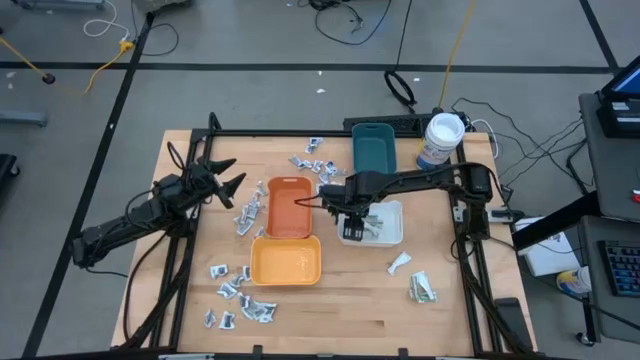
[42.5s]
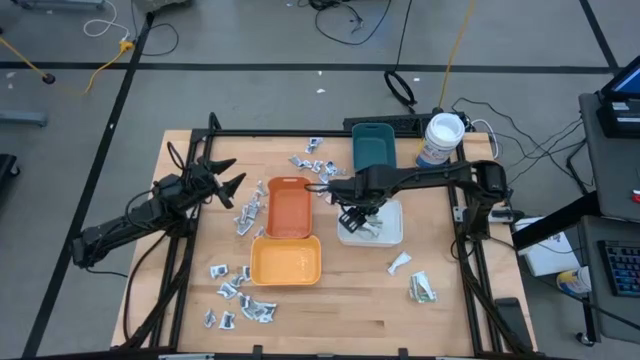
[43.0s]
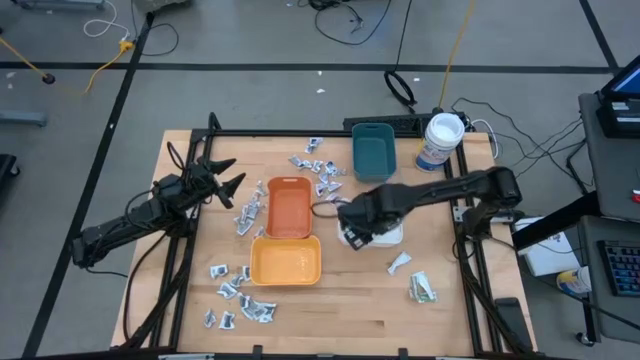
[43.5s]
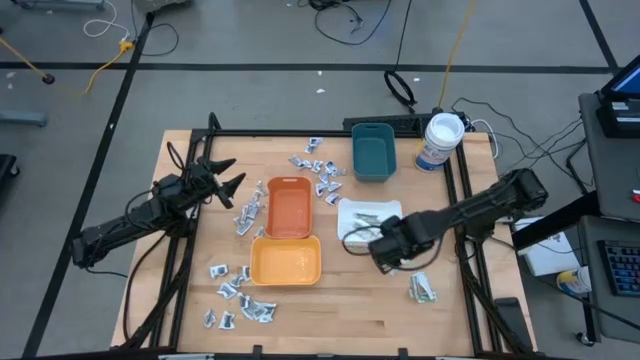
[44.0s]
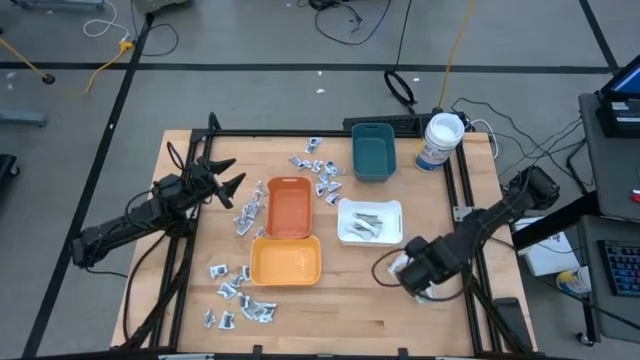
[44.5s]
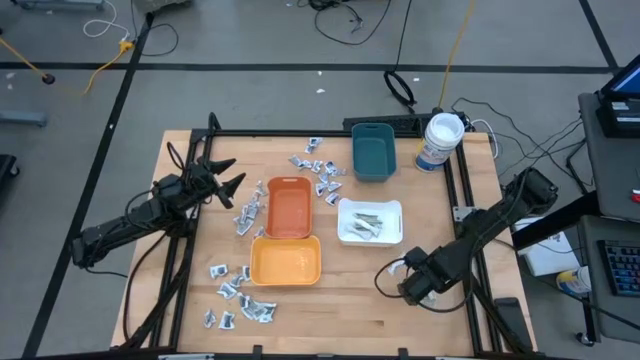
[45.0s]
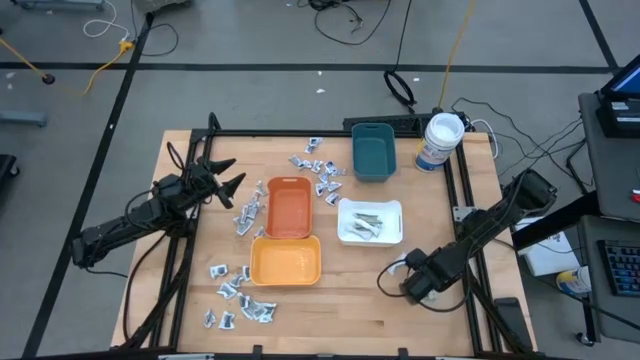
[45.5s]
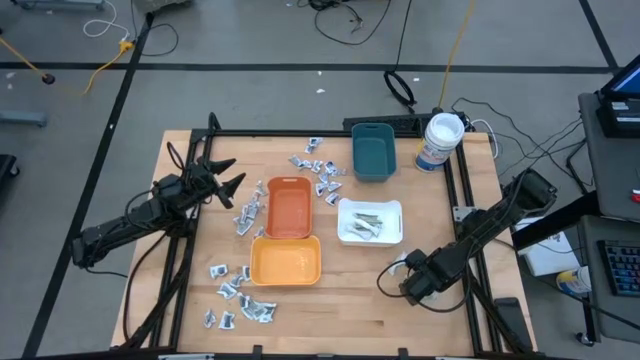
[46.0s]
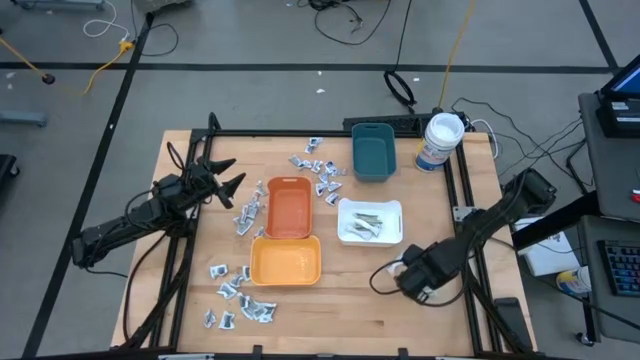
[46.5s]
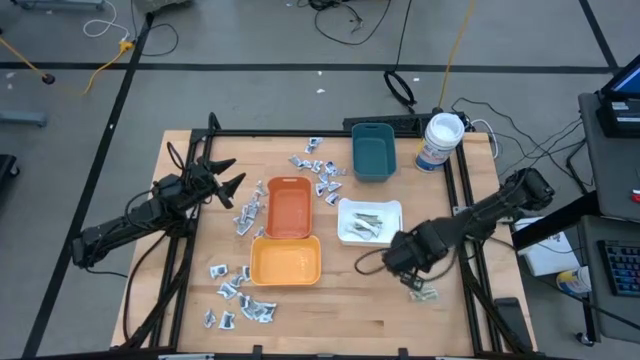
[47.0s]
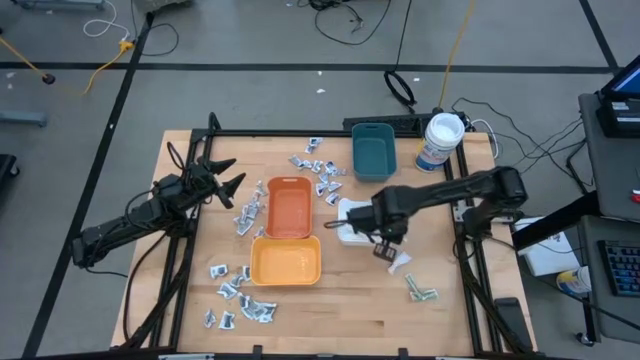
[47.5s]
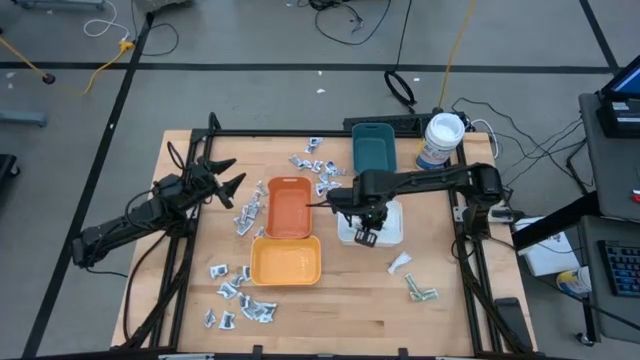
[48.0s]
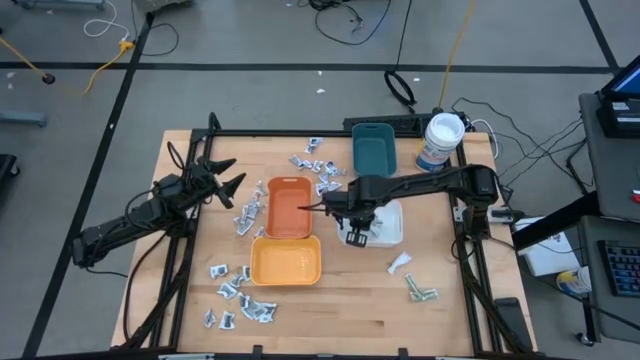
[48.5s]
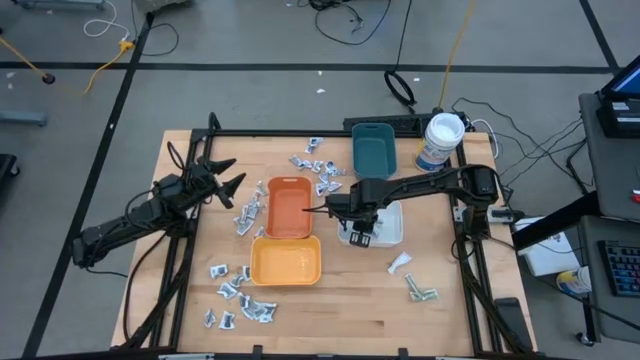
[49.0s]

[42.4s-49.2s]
Task: Pick & Place First Aid Supplies
Put the green sachet into the white bin

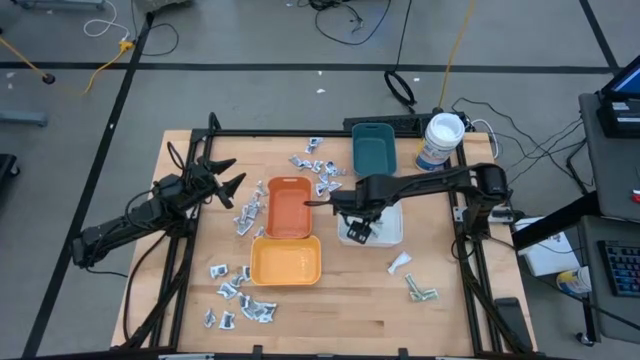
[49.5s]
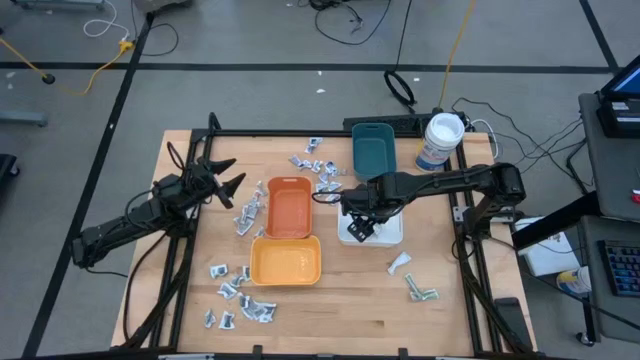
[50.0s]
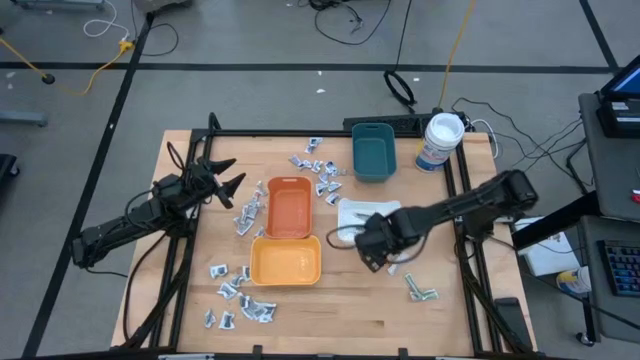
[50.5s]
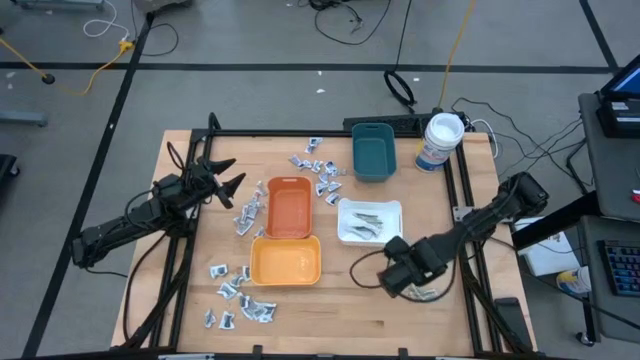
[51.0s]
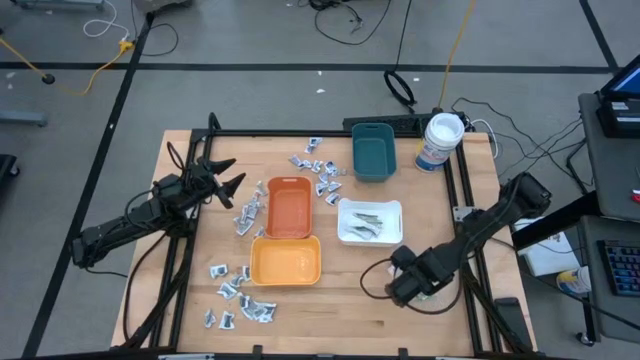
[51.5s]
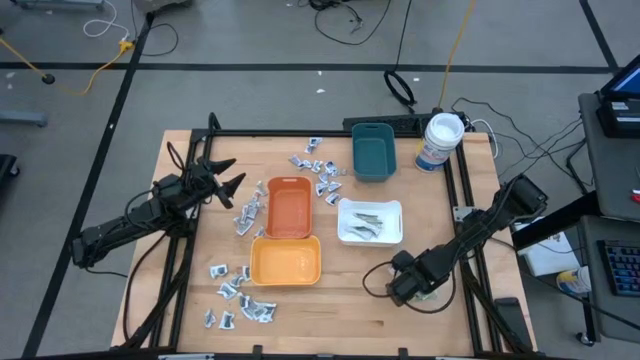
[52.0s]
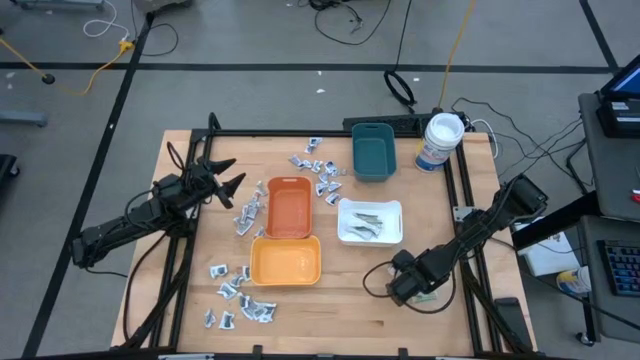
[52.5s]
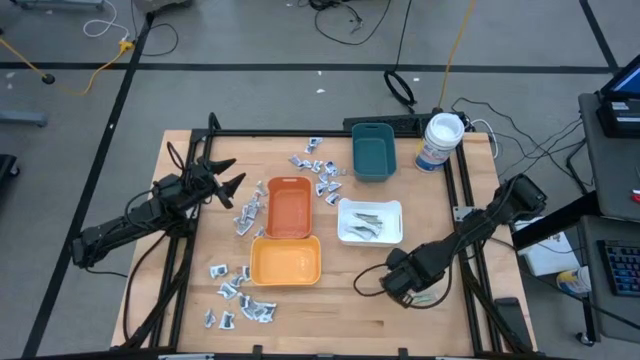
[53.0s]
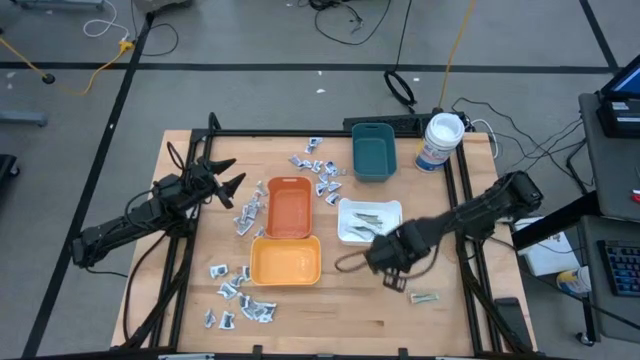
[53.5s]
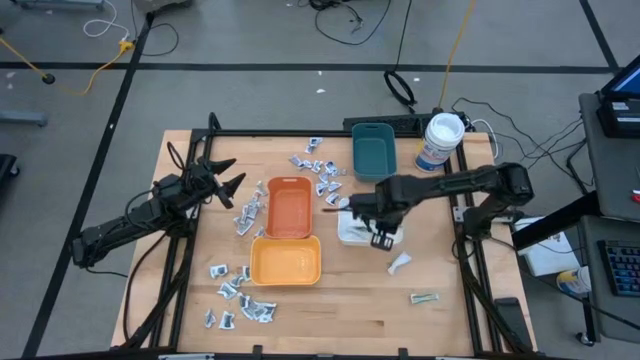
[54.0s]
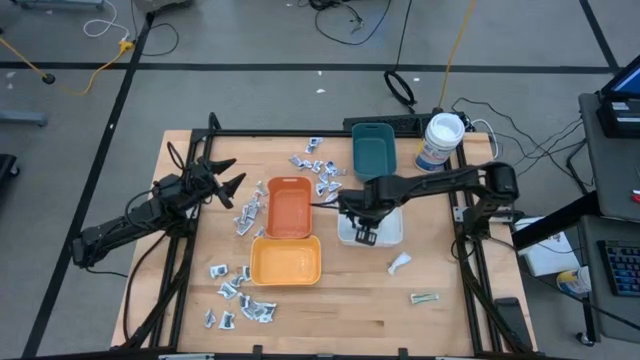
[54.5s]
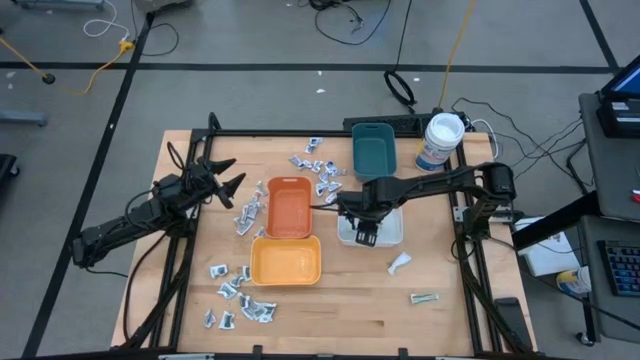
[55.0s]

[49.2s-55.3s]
Put the green sachet into the white bin

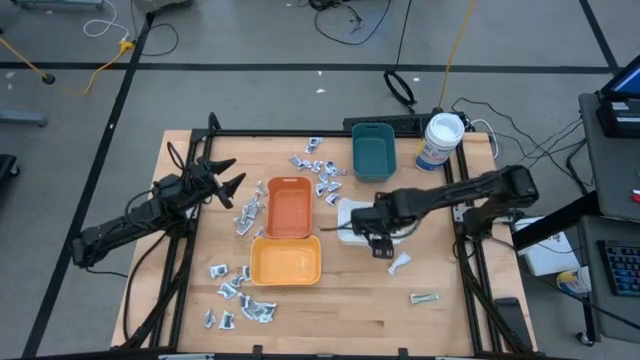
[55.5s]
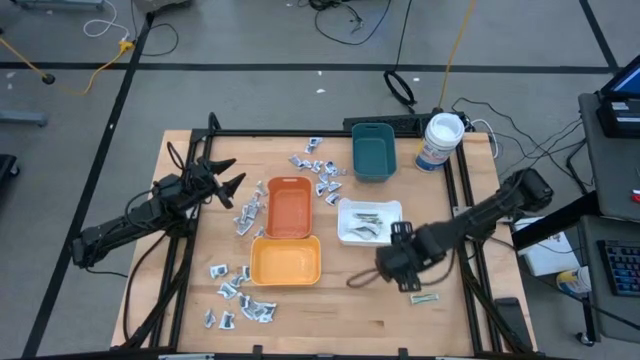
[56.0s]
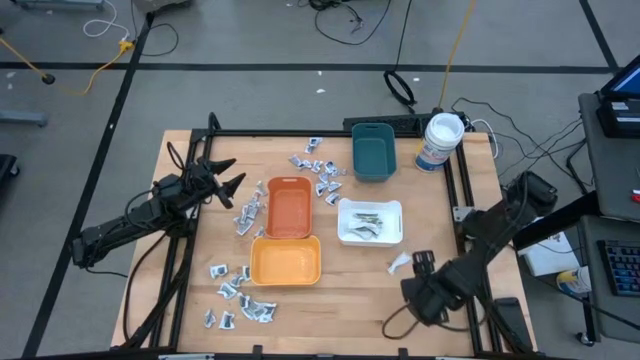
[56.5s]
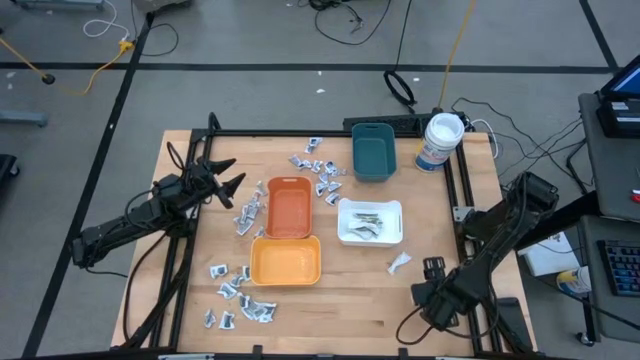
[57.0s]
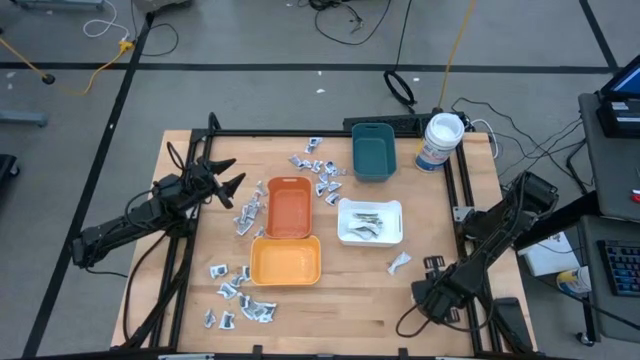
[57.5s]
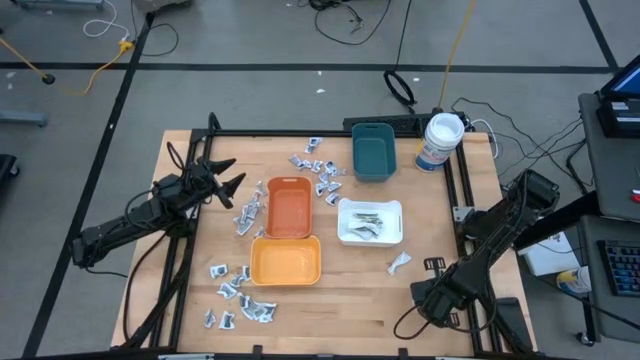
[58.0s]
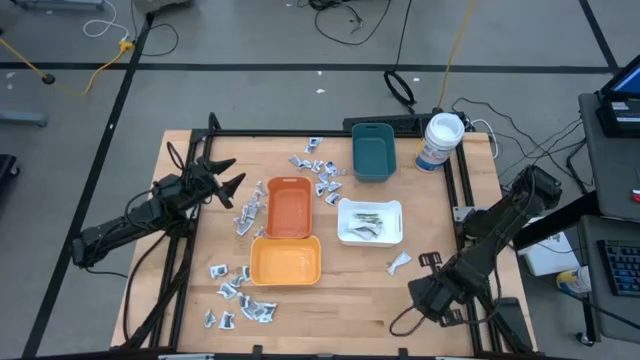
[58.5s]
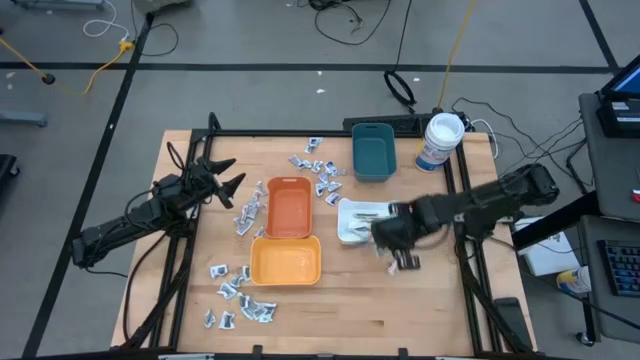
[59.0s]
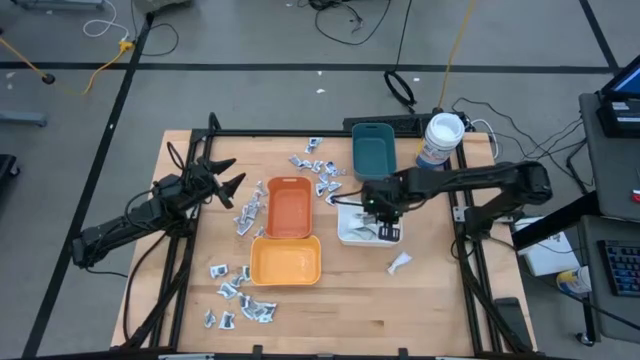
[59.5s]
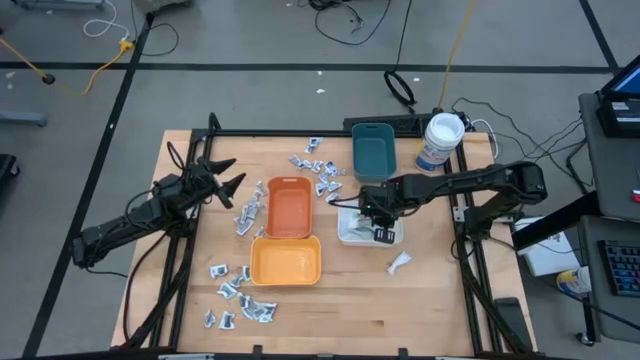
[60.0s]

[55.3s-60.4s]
Put the green sachet into the white bin

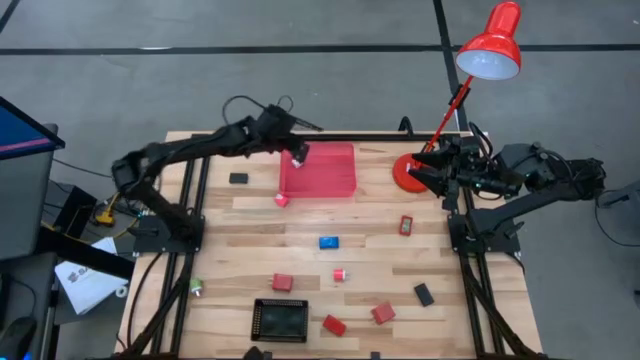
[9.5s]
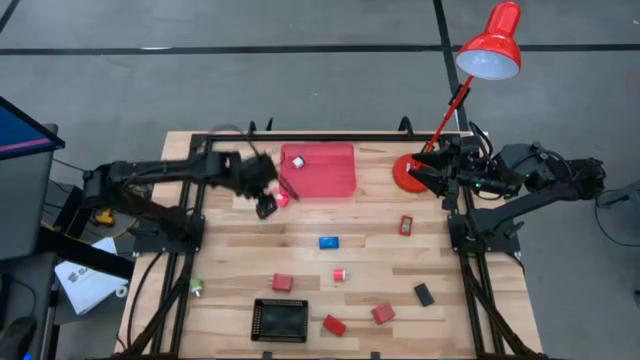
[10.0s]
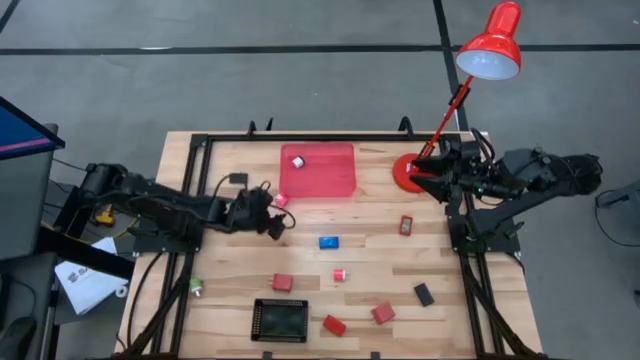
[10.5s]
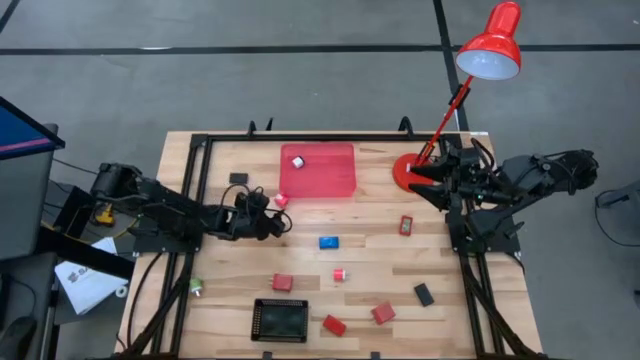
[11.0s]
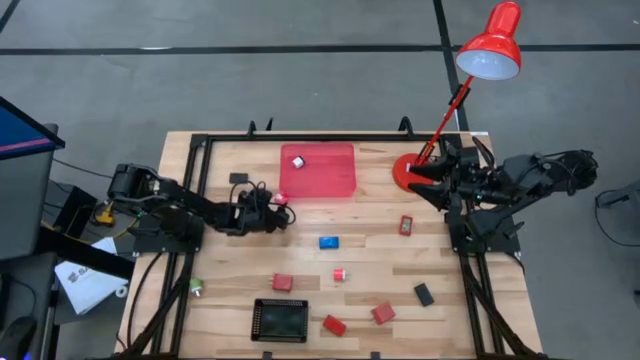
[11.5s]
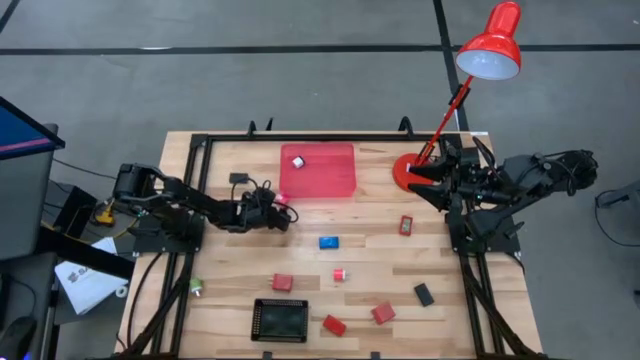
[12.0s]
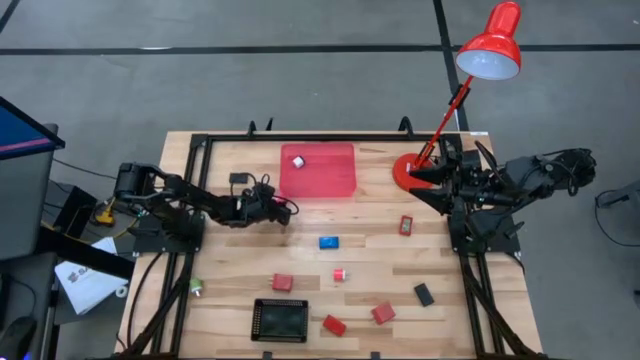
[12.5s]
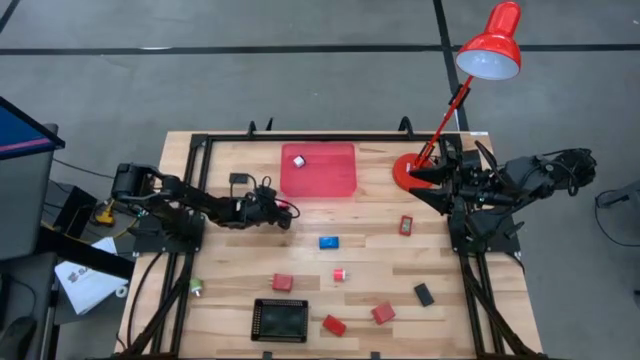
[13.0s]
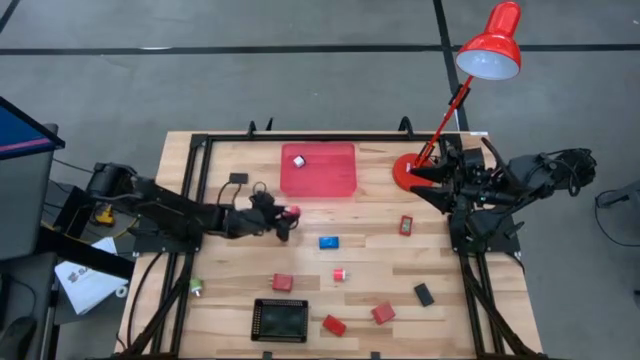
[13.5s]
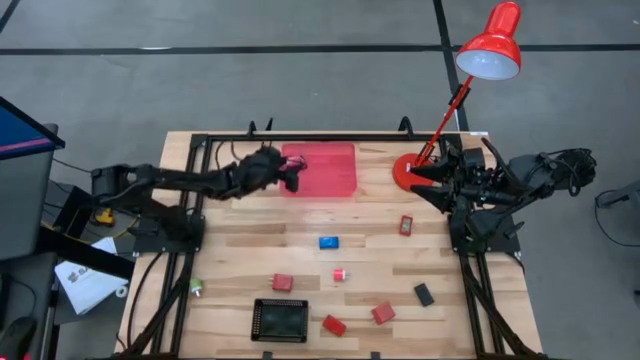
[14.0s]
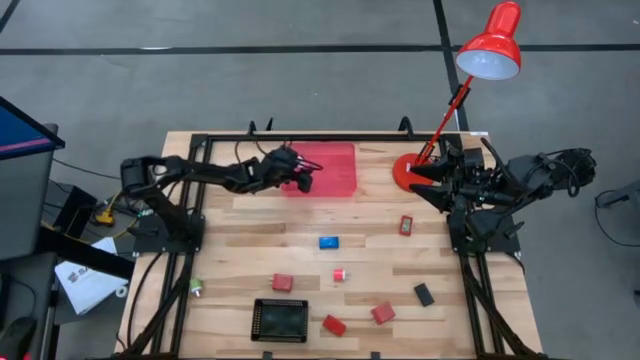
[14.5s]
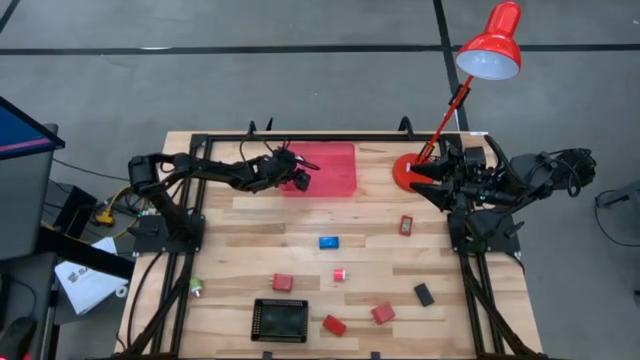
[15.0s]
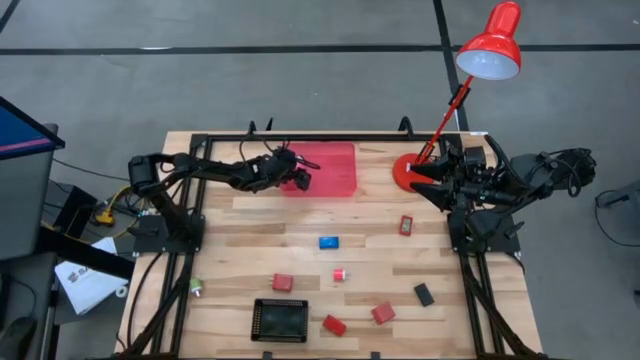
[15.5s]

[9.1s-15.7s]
Task: Pick & Place Office items
Put the pink charger adapter into the pink bin
